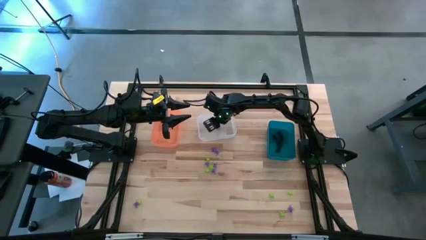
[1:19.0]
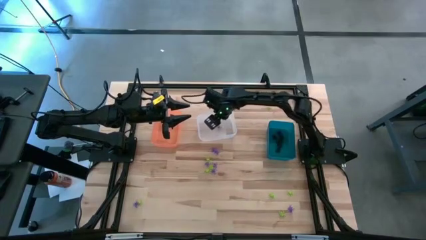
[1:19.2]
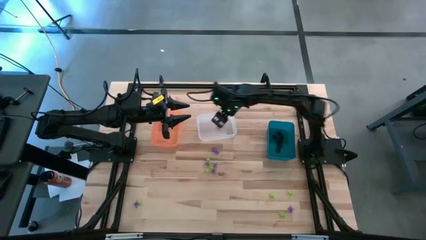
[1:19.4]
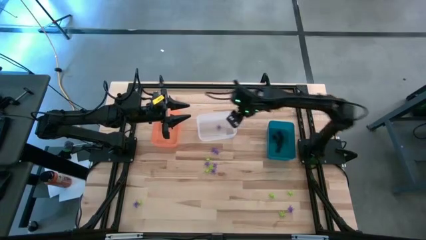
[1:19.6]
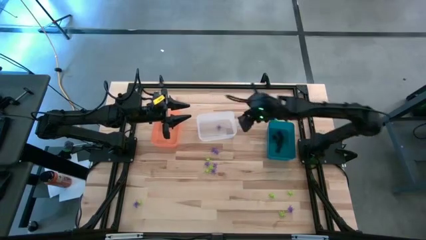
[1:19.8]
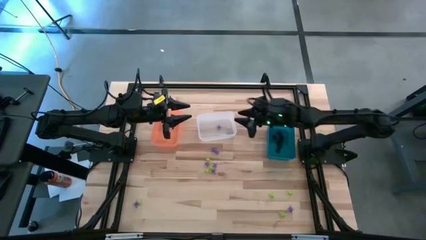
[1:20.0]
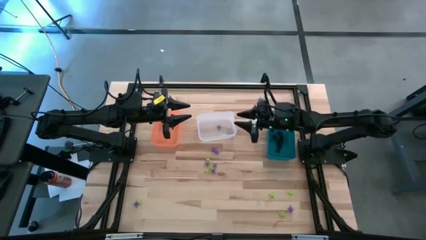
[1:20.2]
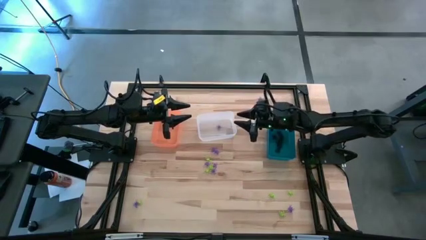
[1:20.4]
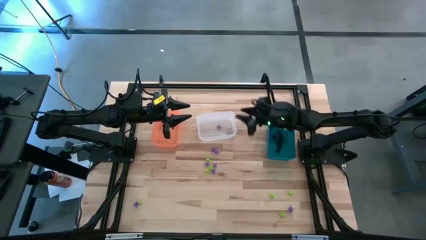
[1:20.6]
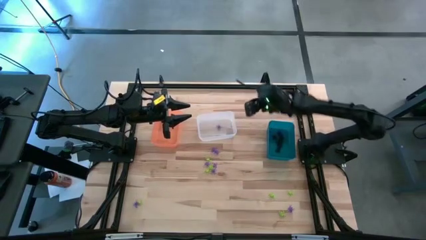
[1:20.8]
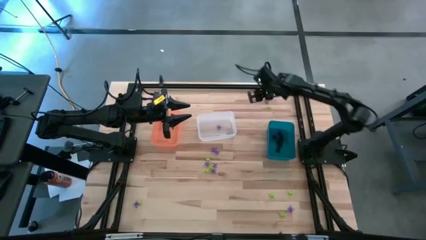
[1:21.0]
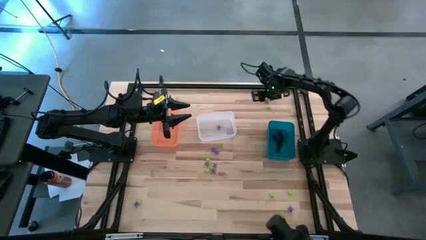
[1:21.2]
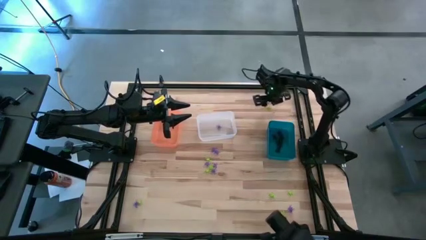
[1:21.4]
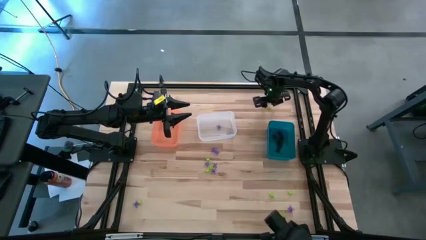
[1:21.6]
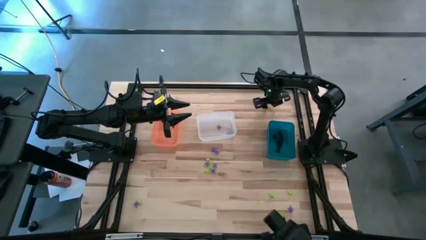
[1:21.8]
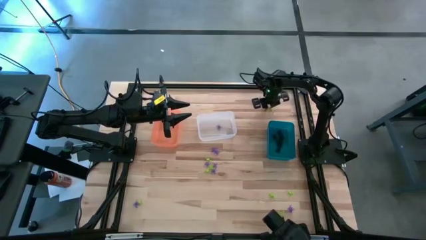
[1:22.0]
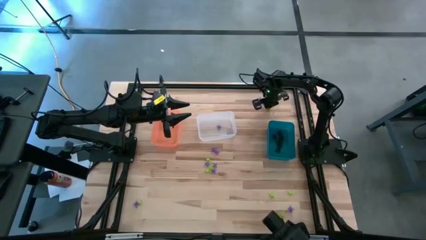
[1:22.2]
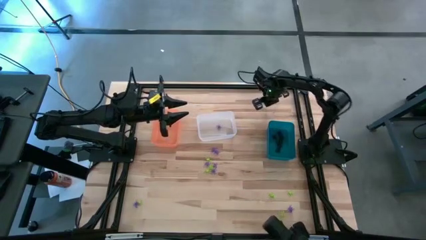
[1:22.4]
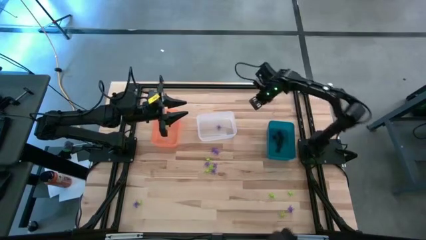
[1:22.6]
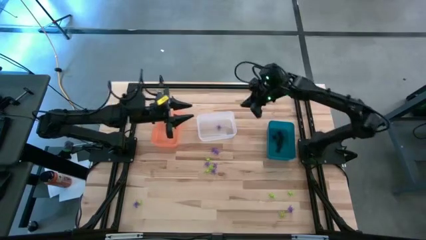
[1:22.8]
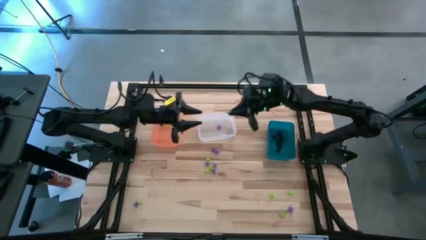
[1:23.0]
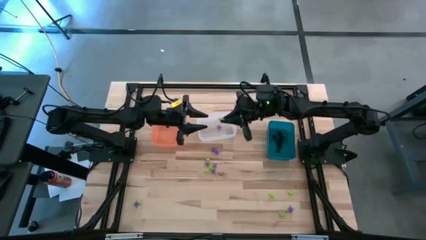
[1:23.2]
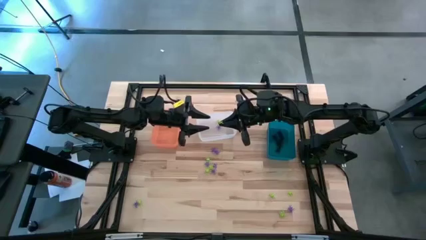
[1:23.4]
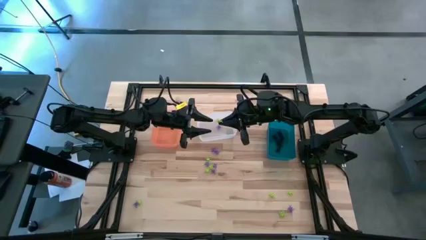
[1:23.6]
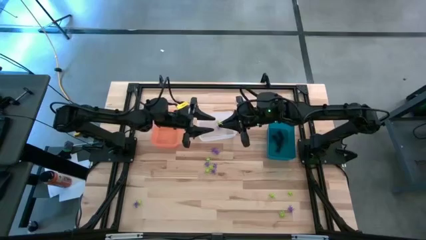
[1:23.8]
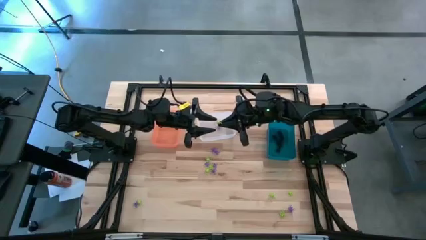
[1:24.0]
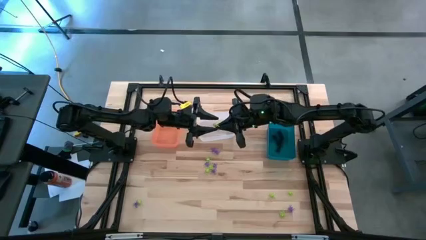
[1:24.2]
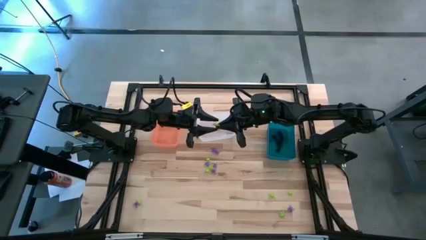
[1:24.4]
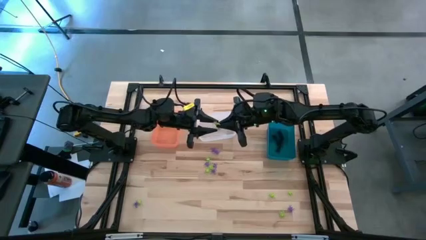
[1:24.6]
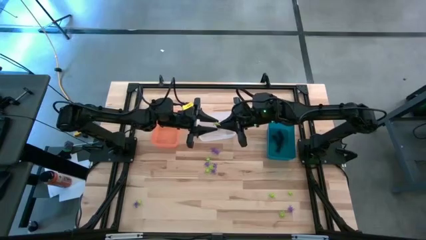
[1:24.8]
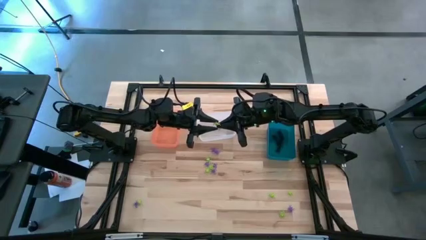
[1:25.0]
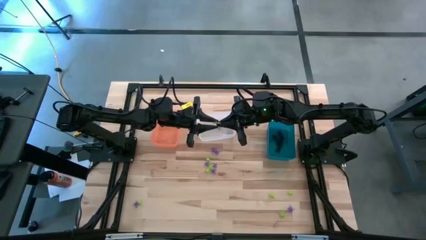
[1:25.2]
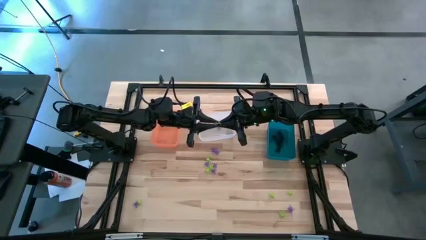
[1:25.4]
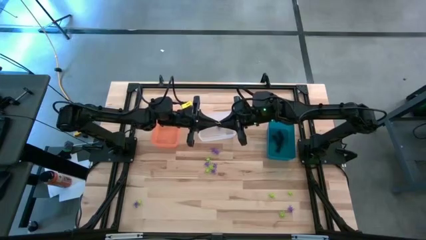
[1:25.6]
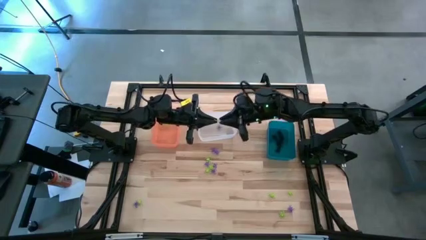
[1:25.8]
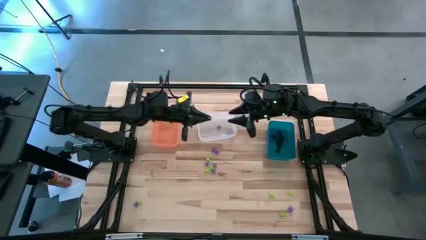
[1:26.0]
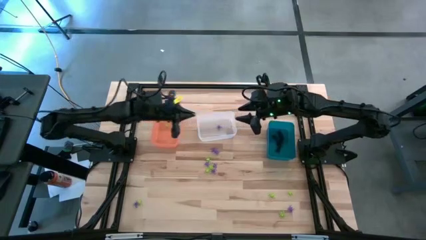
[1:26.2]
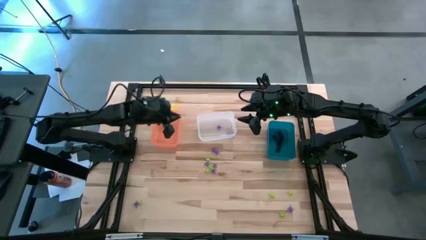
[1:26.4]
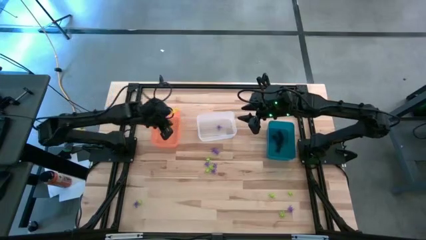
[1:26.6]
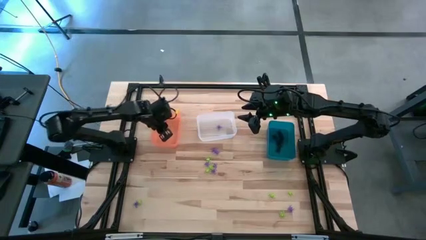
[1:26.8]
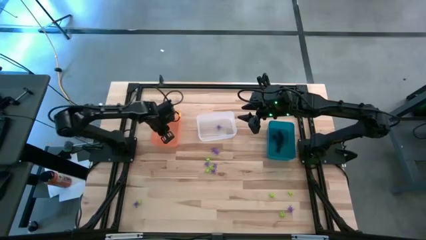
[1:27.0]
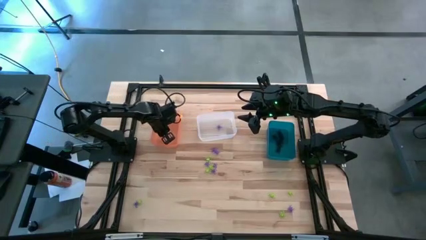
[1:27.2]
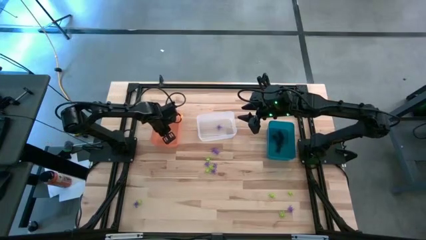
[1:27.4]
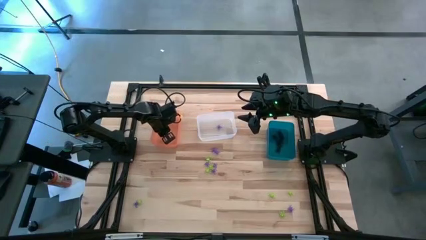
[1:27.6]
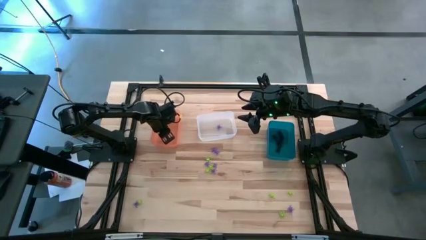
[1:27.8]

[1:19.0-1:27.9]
Task: Sort Halloween decoration
Put the green spider toy into the orange bin

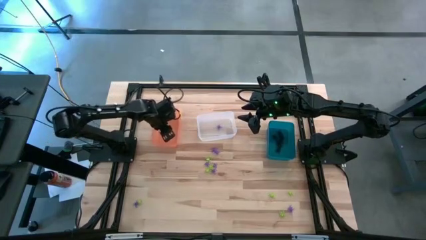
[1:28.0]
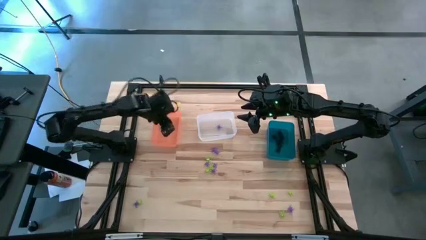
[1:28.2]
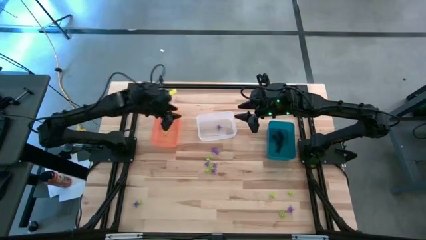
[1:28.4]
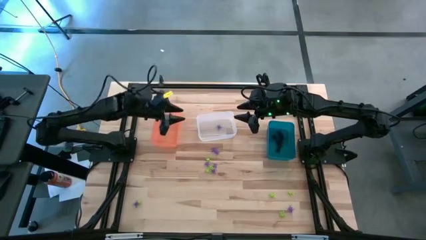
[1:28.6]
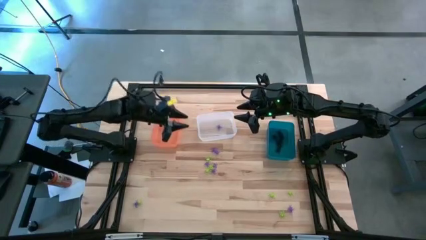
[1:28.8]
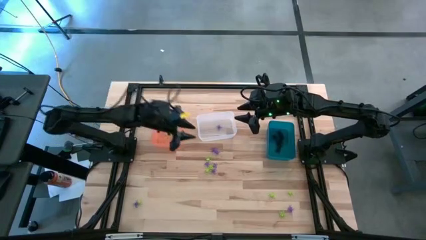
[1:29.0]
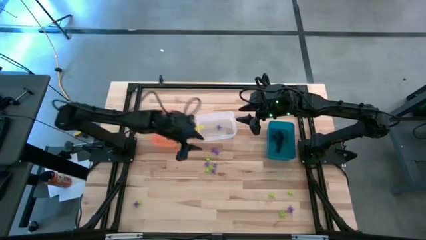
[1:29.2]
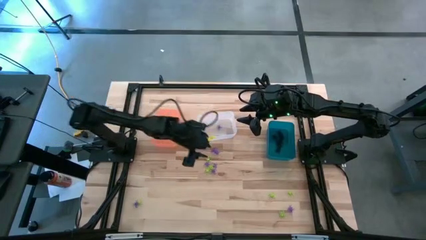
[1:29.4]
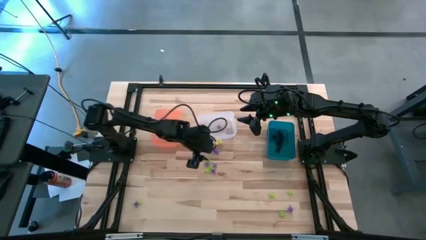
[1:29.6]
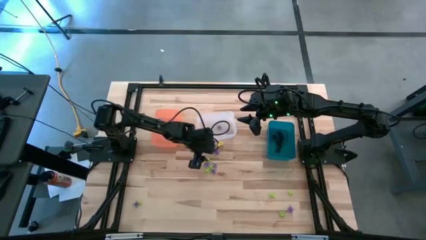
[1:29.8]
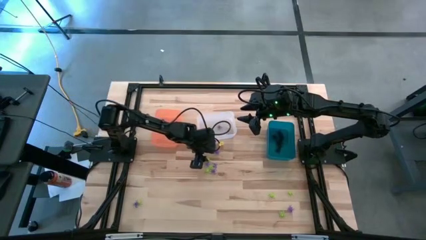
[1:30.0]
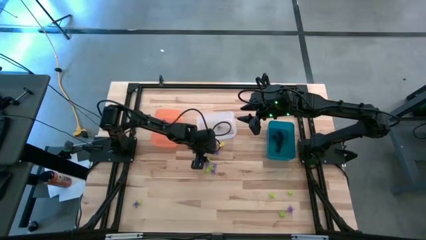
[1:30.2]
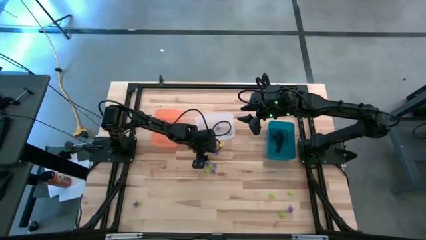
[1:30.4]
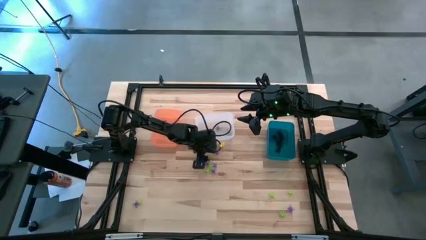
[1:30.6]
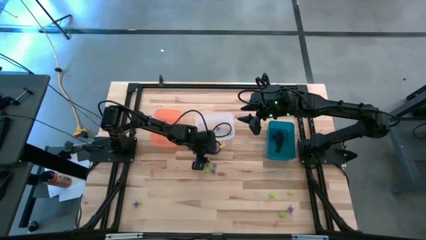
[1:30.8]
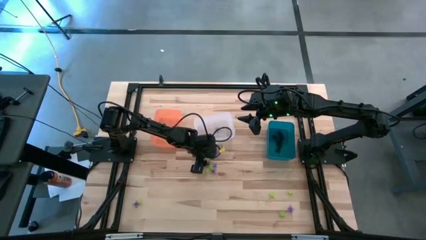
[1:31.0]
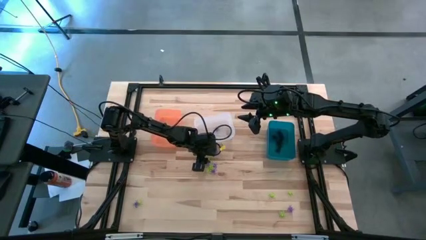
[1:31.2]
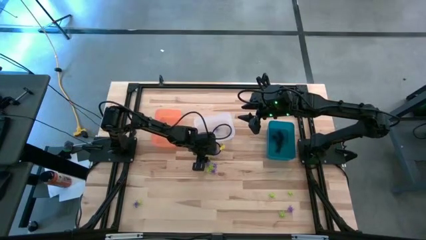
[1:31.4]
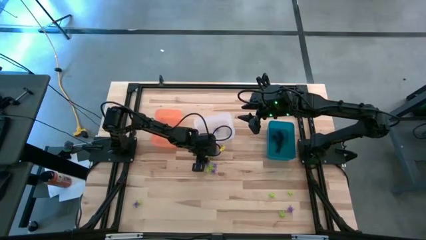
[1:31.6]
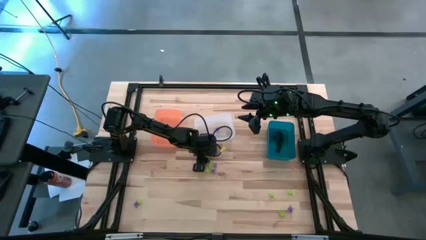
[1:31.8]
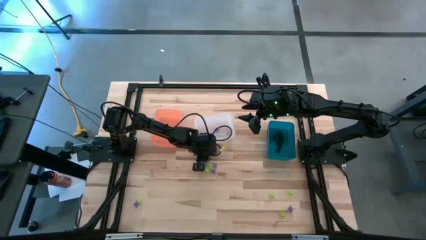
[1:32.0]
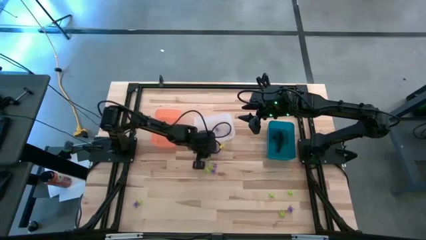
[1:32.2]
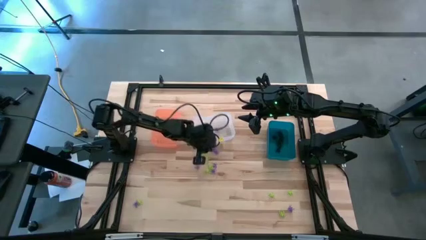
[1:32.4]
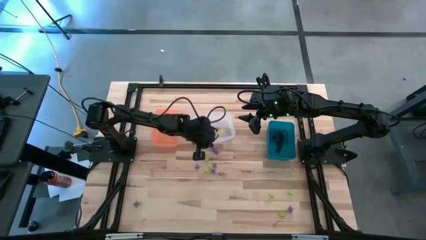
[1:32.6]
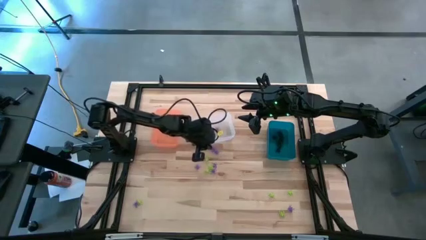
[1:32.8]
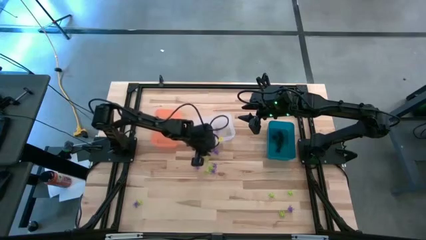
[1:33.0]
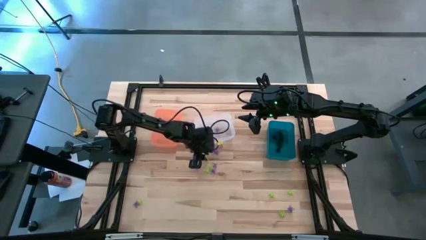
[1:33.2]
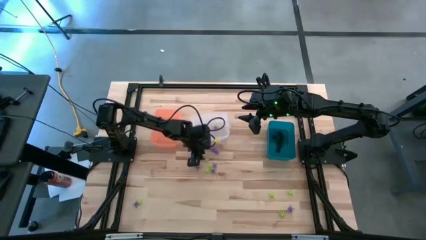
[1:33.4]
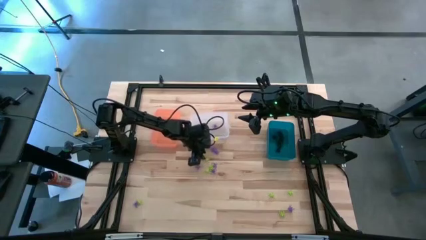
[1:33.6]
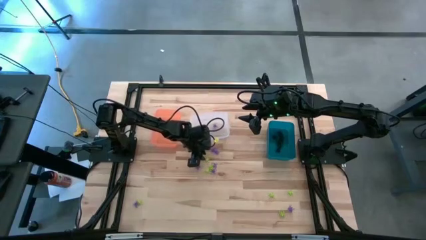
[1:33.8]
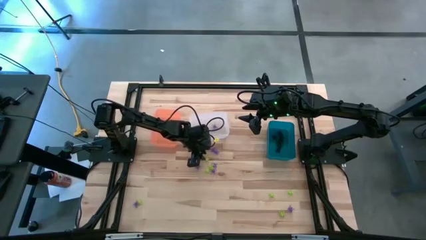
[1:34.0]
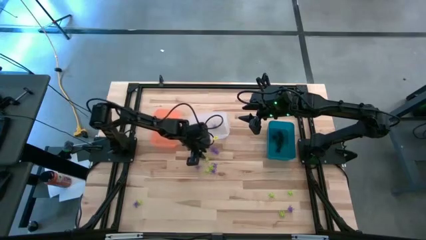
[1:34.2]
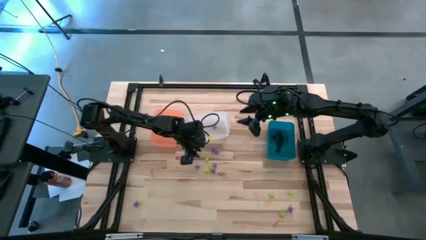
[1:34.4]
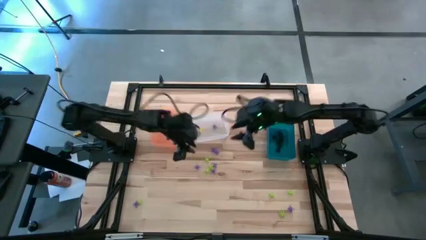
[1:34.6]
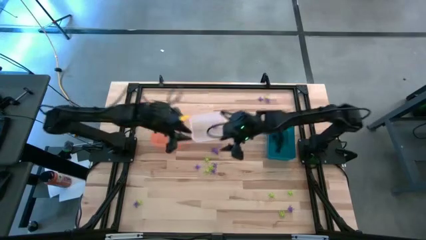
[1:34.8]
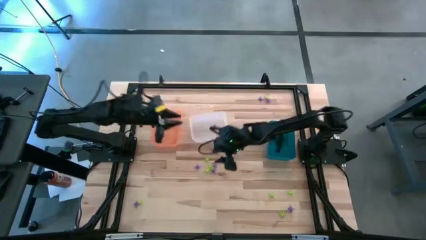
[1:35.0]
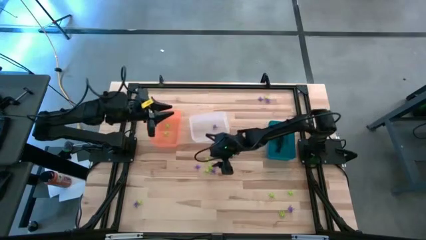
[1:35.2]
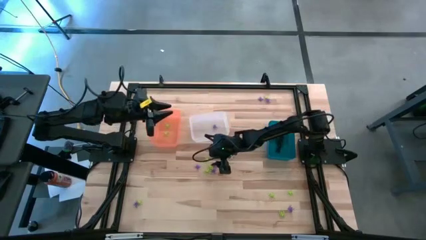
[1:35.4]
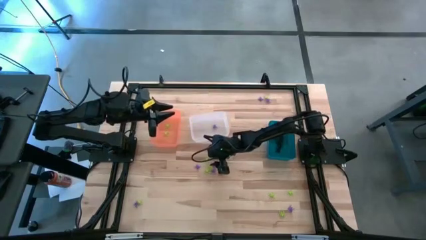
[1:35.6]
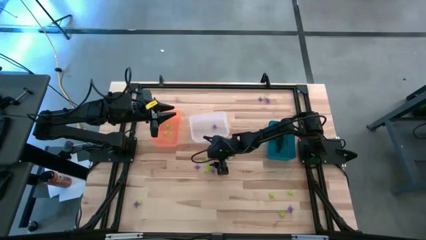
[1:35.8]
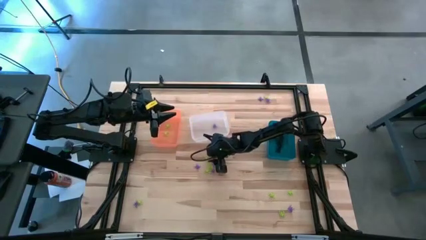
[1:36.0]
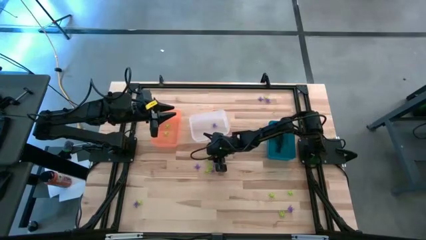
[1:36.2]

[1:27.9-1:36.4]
Put the green spider toy into the orange bin
